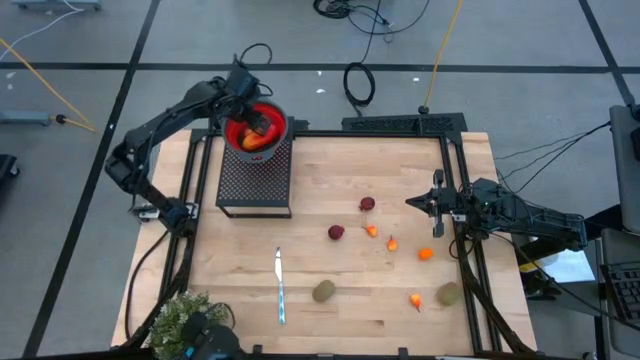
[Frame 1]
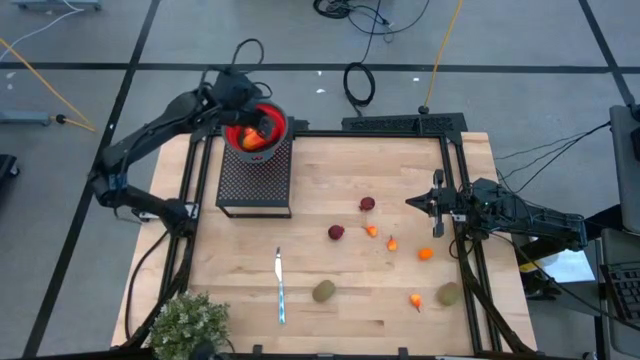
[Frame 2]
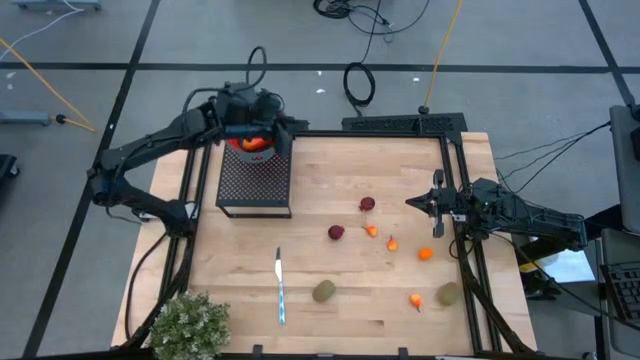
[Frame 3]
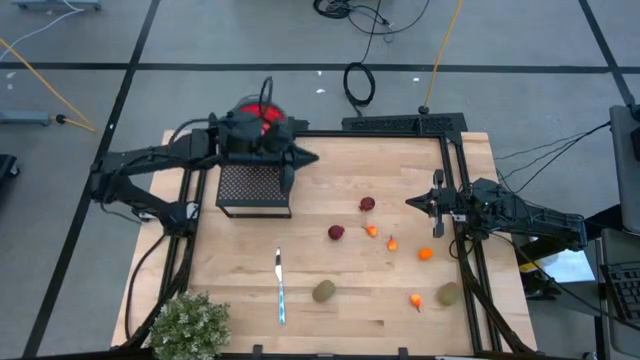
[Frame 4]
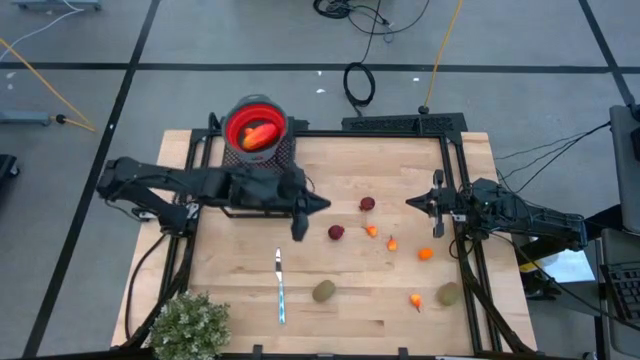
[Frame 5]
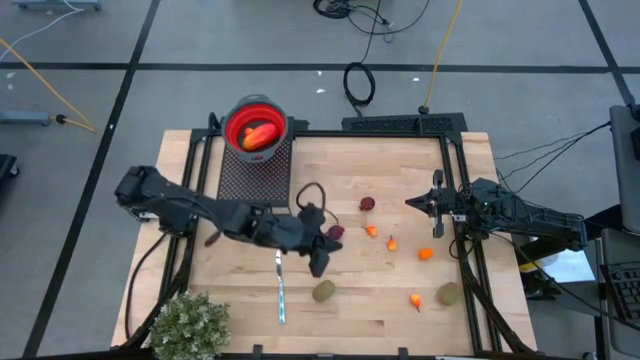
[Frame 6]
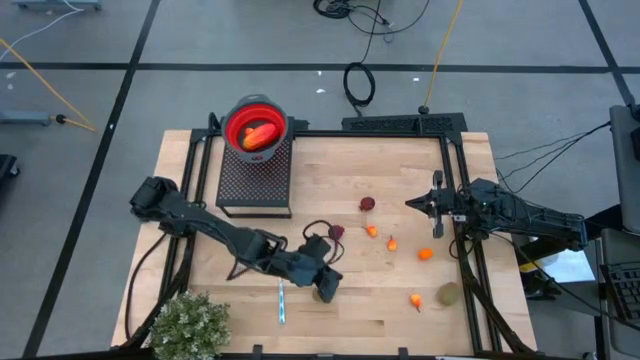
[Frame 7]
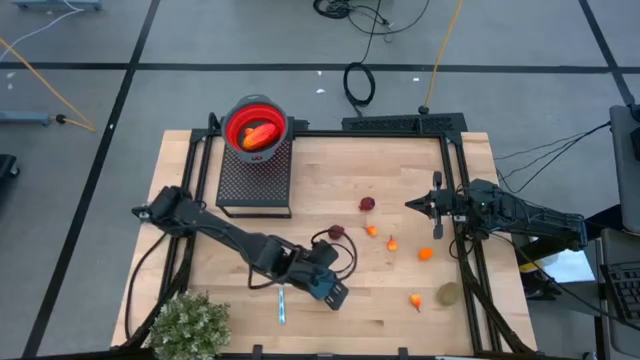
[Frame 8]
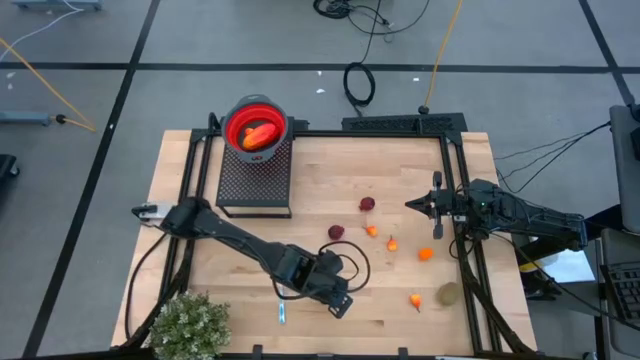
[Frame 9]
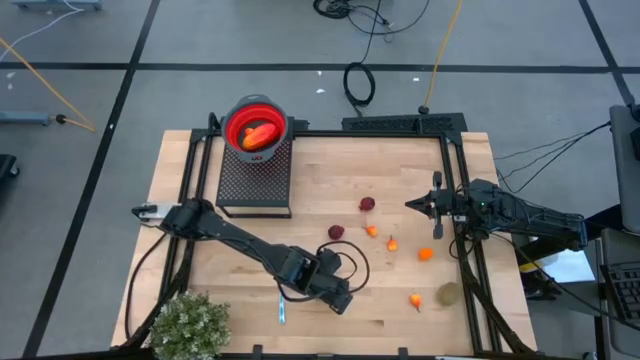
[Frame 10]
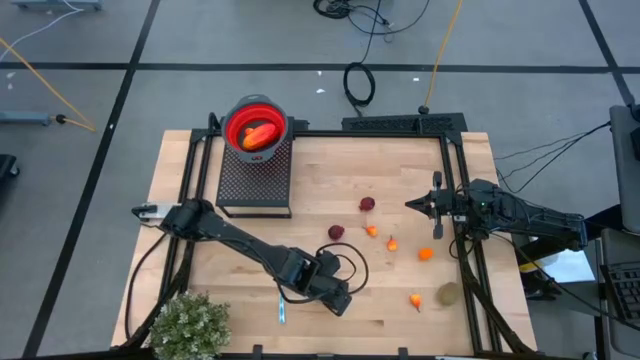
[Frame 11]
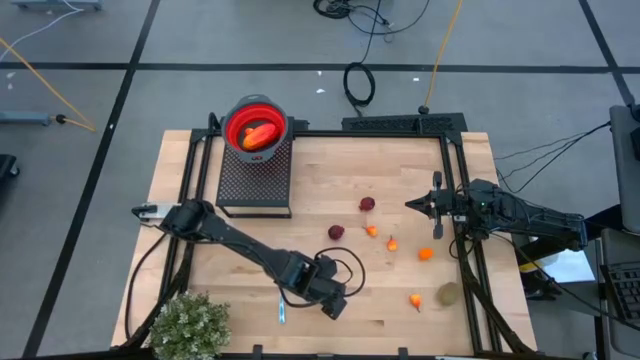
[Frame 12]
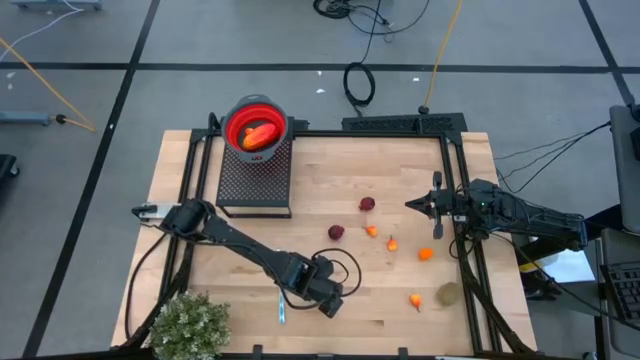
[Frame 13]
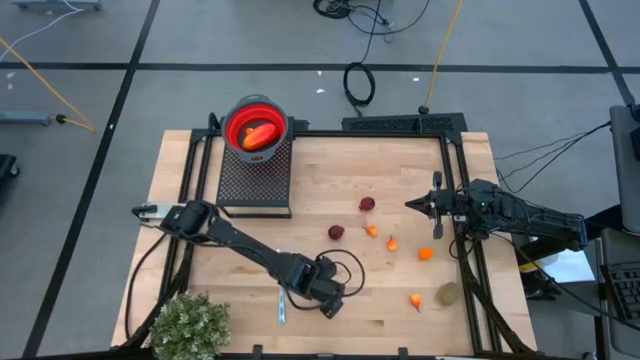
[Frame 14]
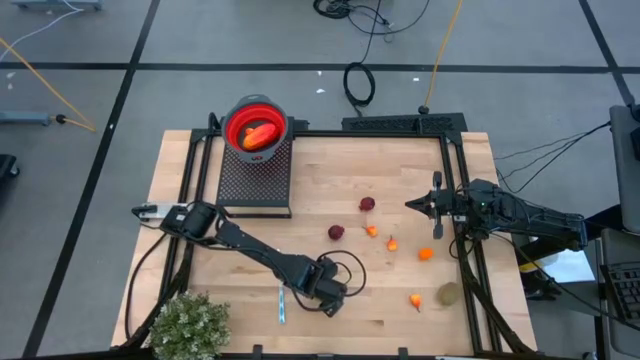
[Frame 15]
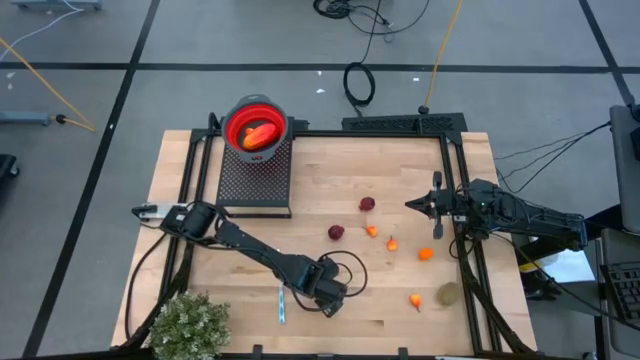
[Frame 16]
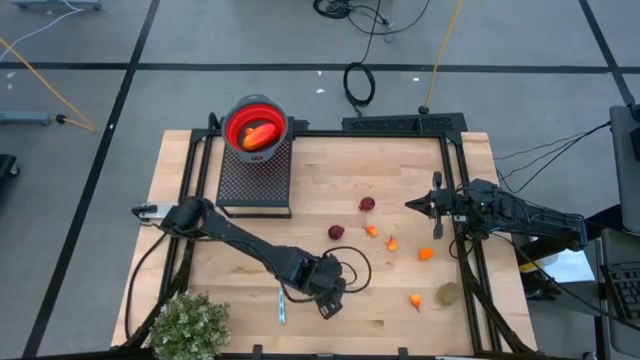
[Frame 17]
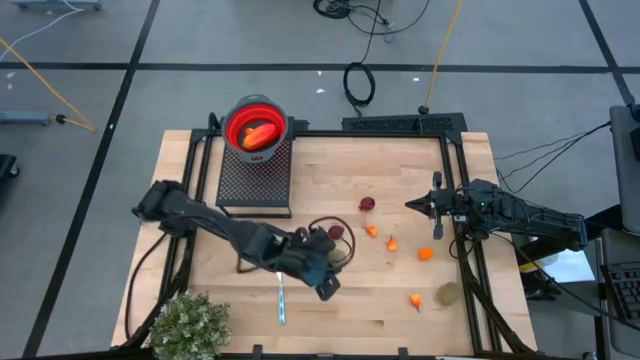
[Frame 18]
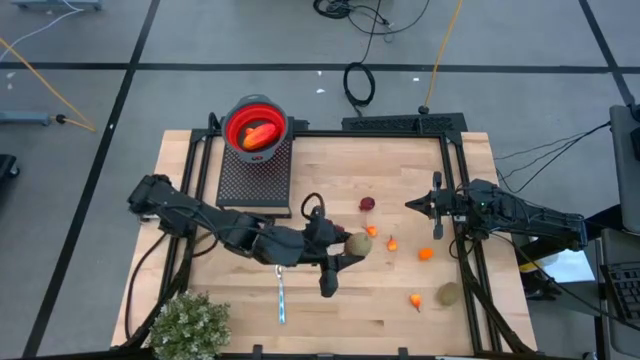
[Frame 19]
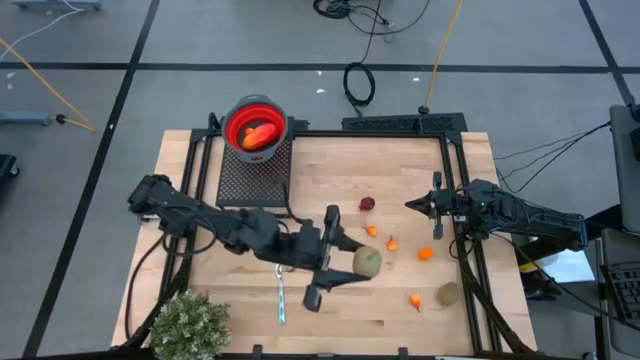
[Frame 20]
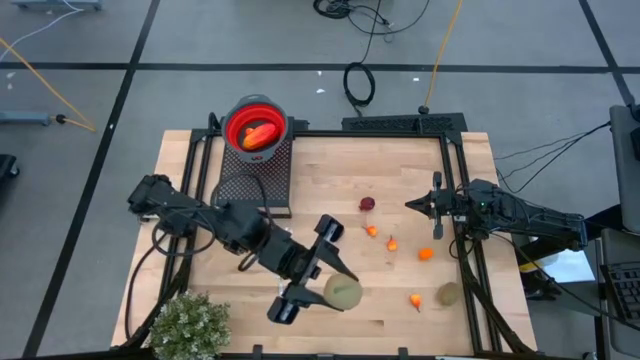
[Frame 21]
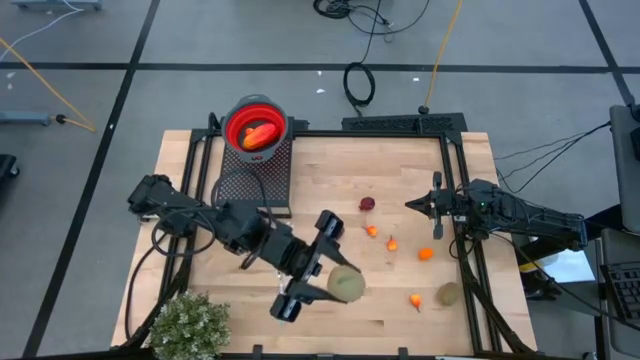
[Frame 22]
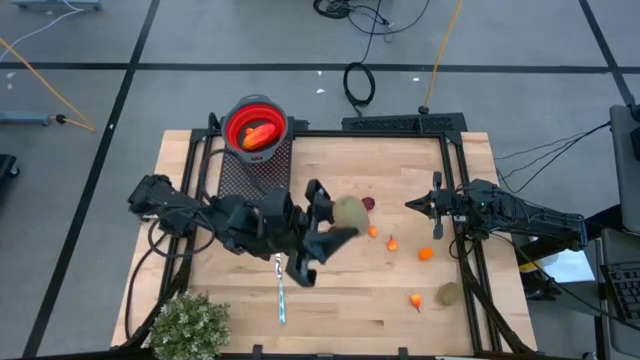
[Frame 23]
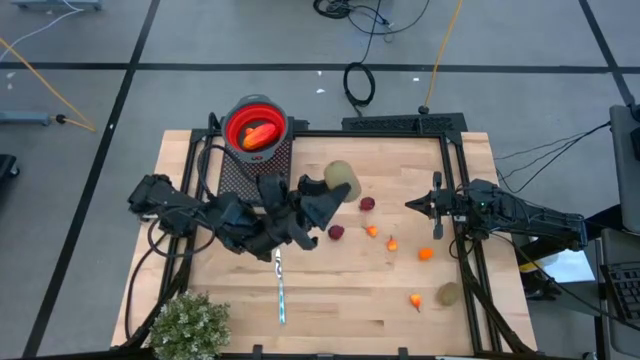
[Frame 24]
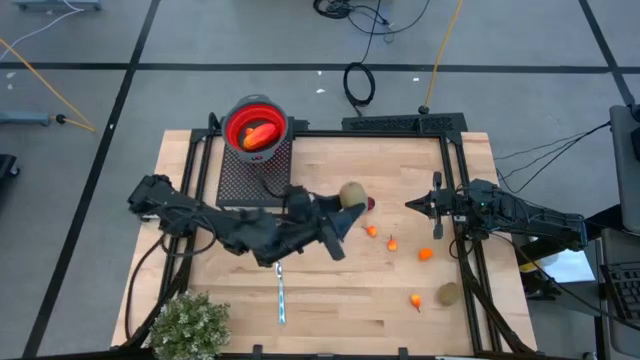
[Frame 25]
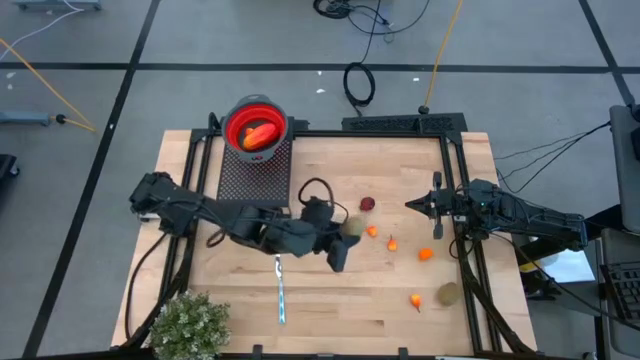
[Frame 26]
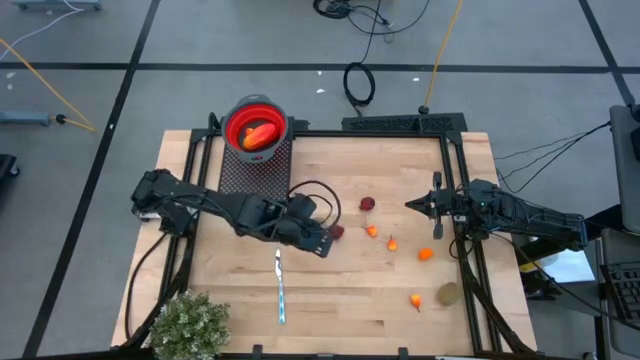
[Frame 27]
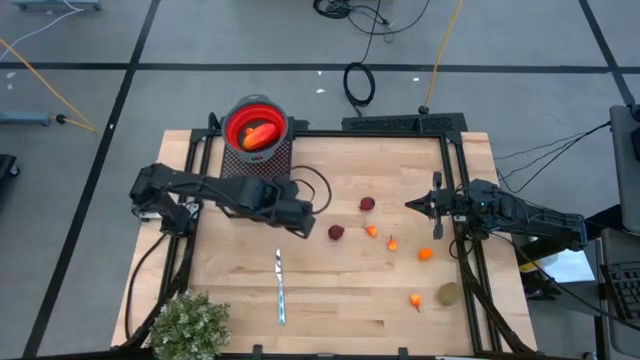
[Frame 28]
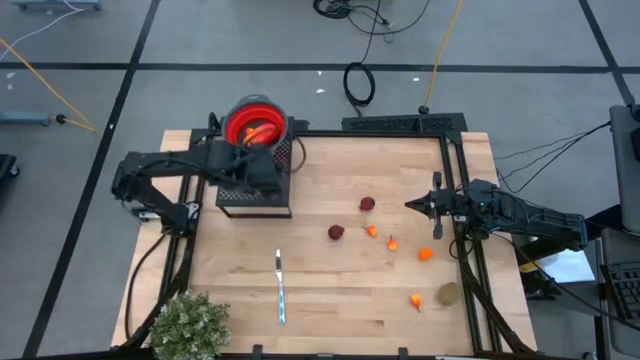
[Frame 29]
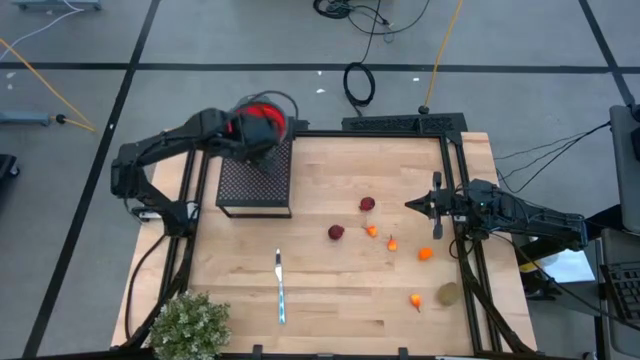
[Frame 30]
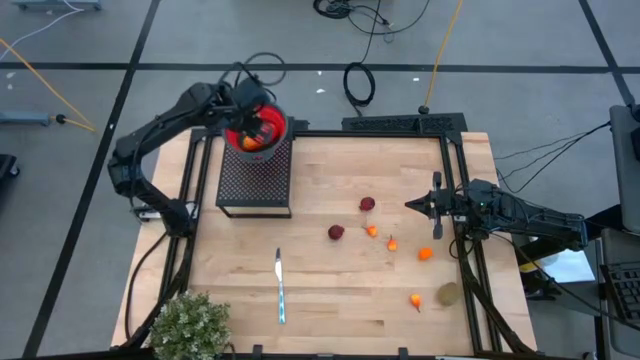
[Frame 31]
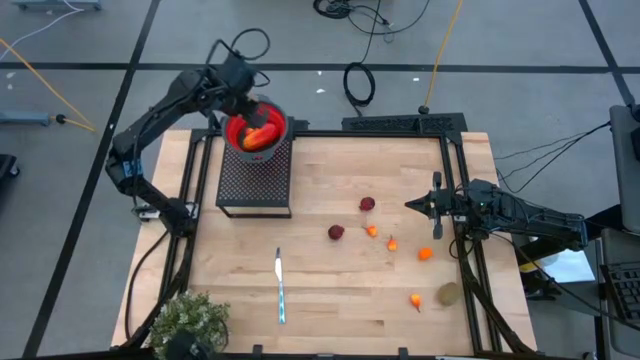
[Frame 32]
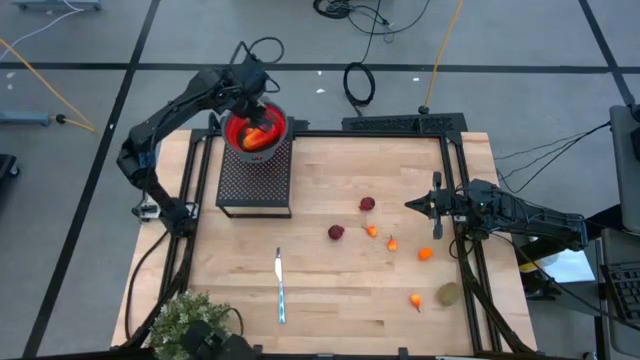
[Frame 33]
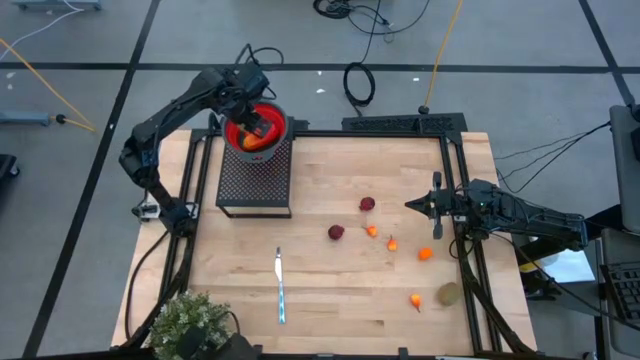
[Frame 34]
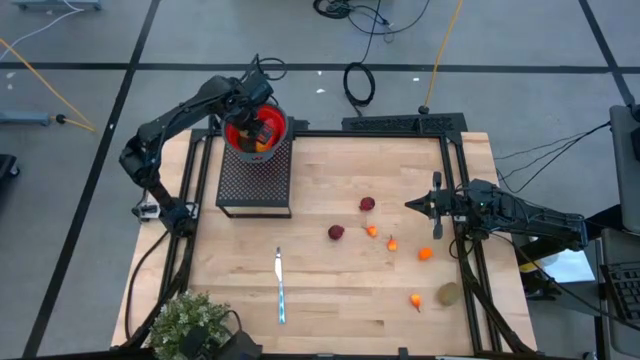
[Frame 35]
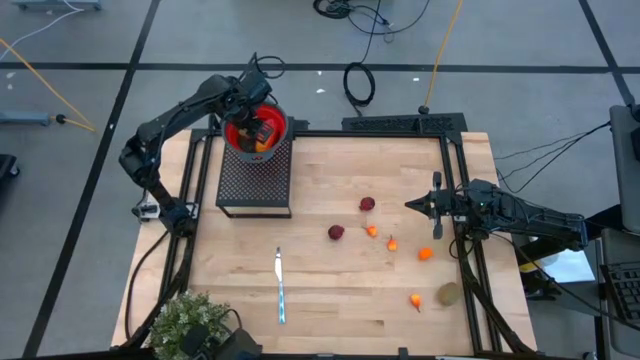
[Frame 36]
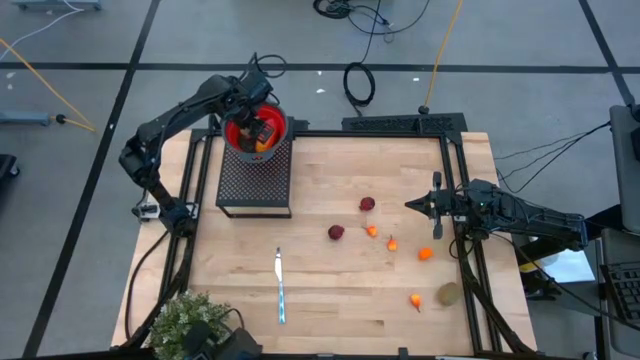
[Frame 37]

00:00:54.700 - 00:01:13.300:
Task: Pick & Place Fruit
Put the kiwi into the red strainer bowl on the shelf

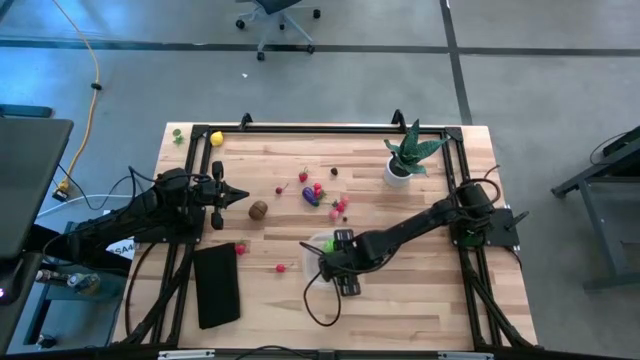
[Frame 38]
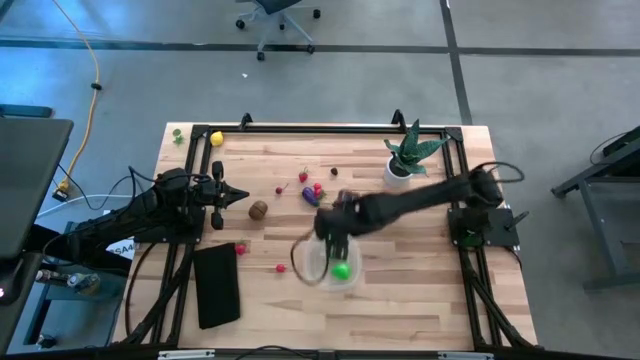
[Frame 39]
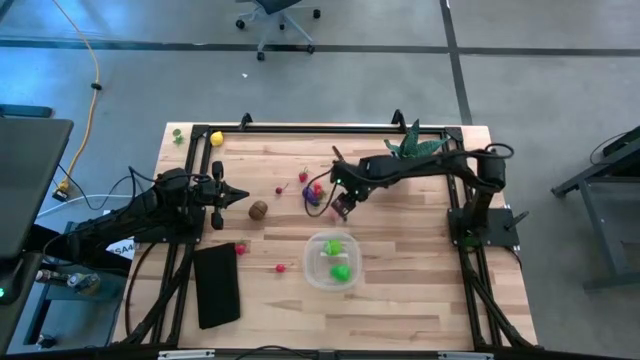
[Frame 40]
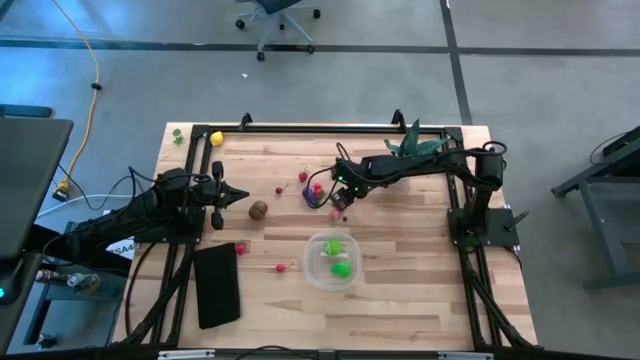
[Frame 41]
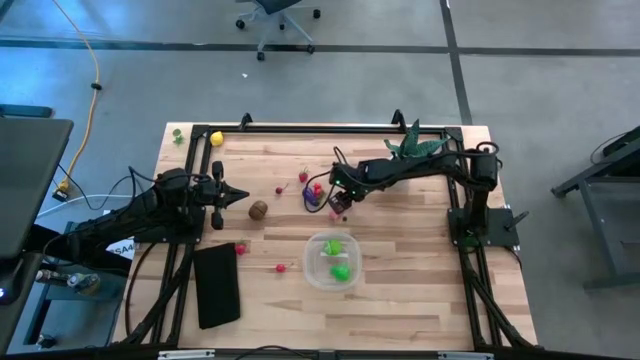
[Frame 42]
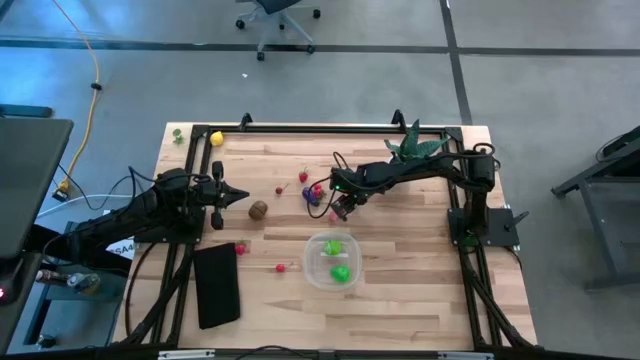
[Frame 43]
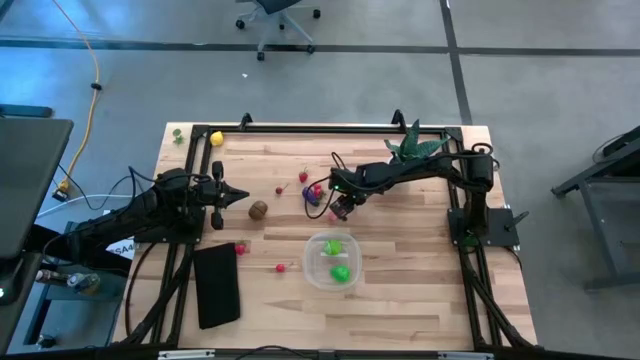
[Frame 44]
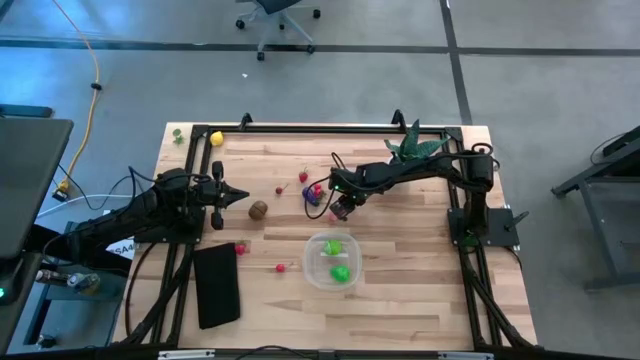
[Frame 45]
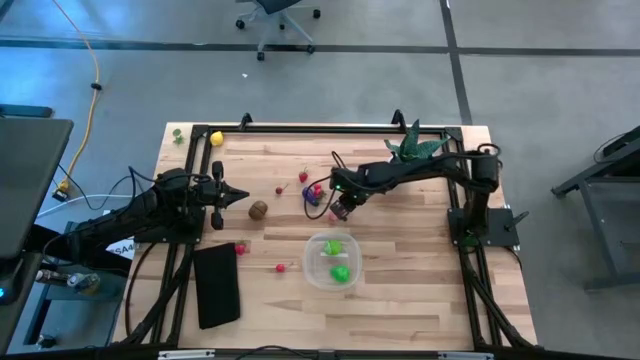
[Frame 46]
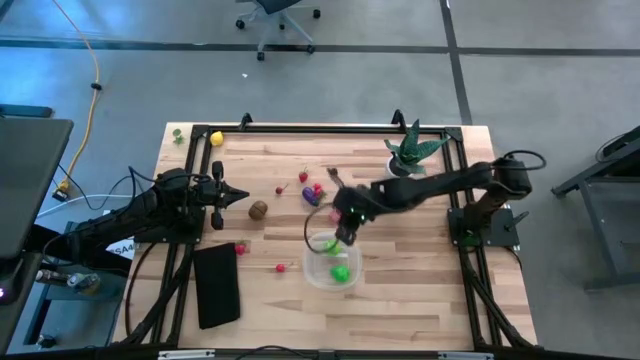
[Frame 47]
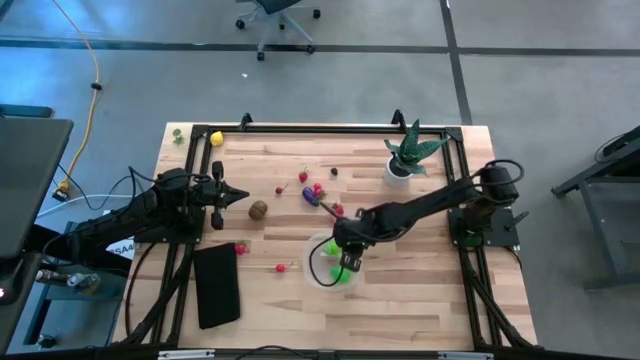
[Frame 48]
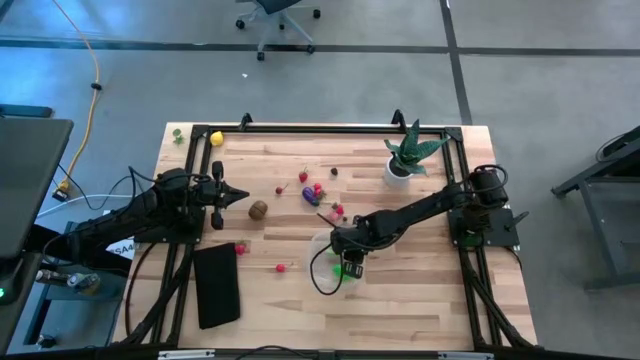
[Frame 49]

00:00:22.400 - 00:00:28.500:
Task: Pick and placing Produce into tupperware
Put the pink peach into the transparent container
